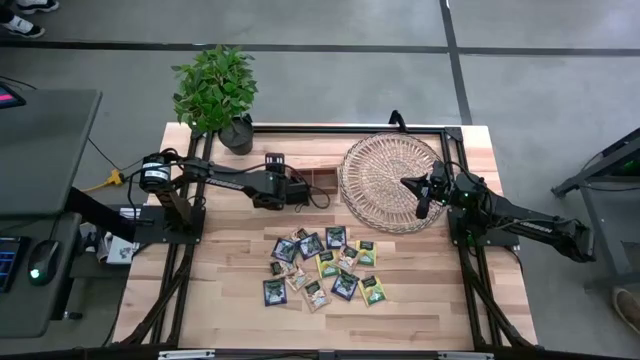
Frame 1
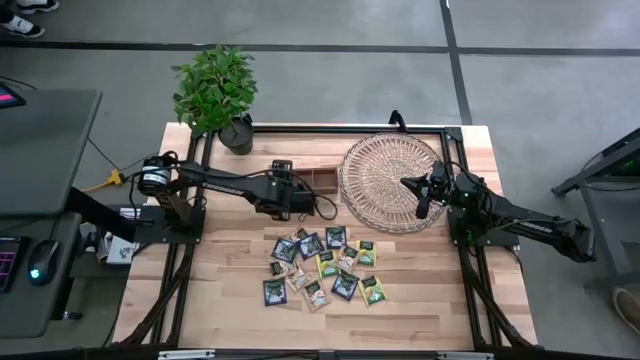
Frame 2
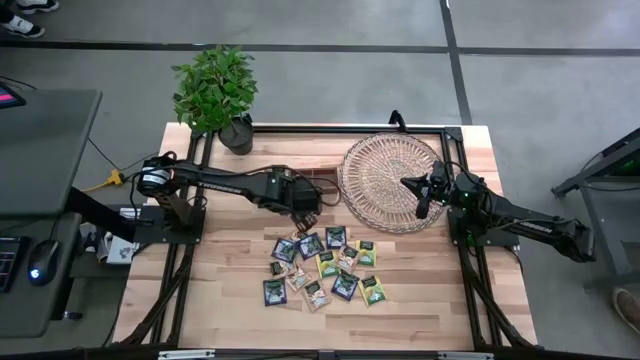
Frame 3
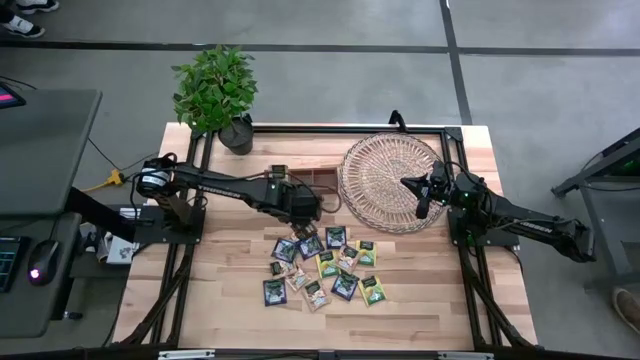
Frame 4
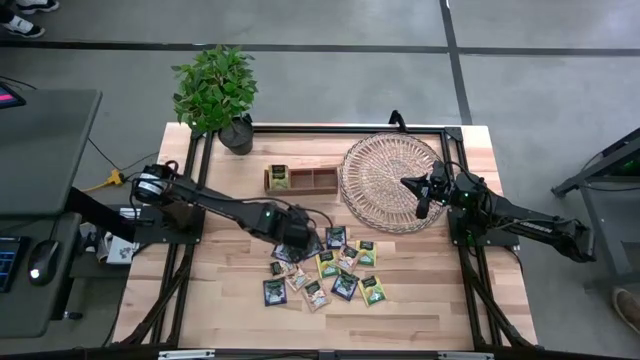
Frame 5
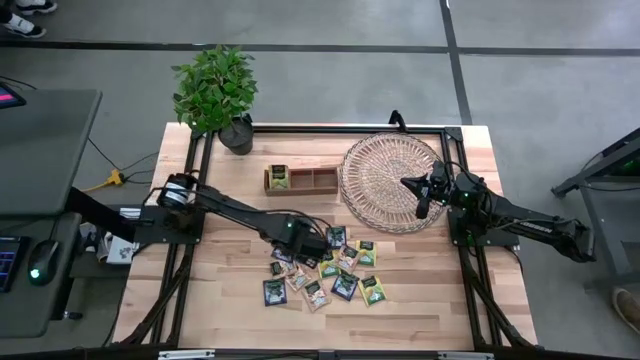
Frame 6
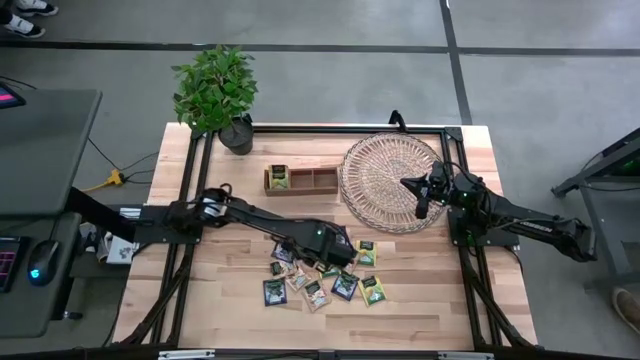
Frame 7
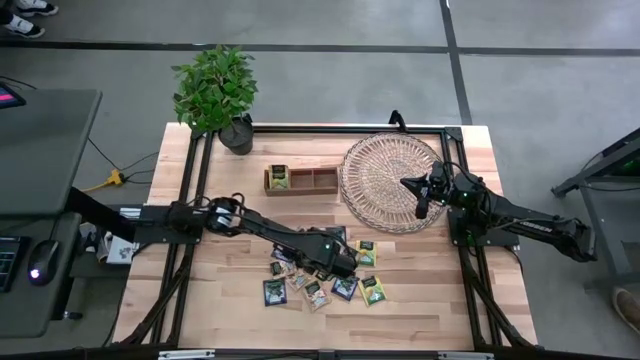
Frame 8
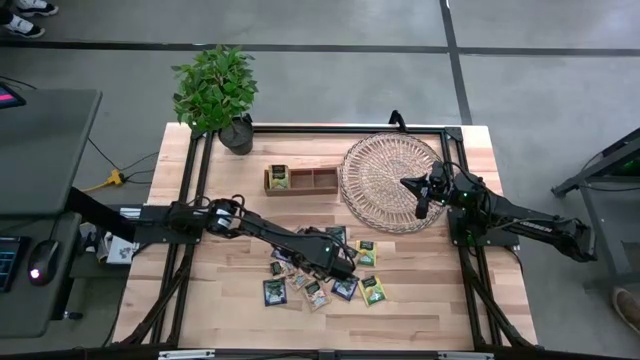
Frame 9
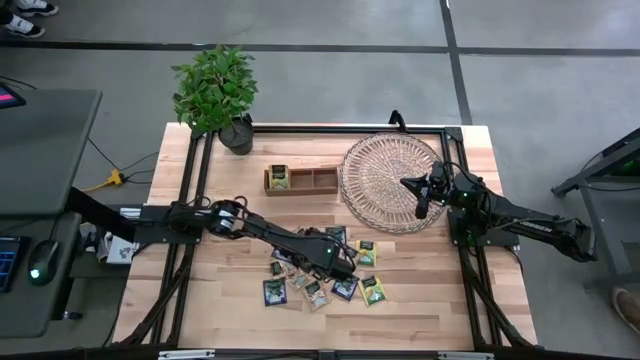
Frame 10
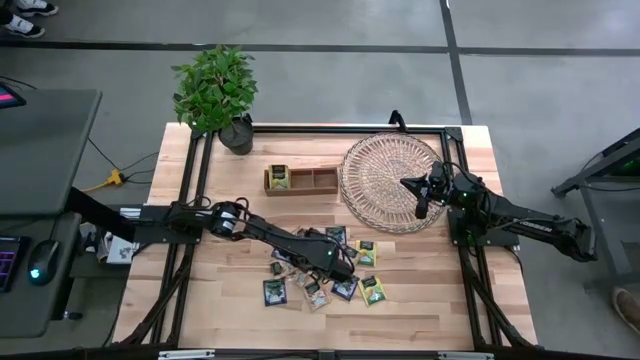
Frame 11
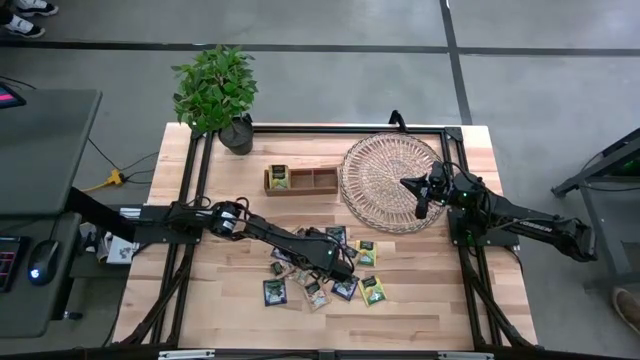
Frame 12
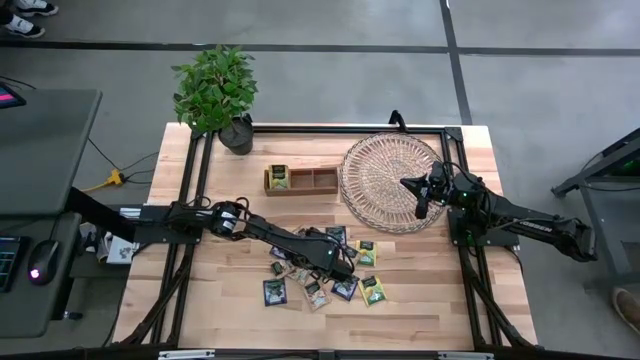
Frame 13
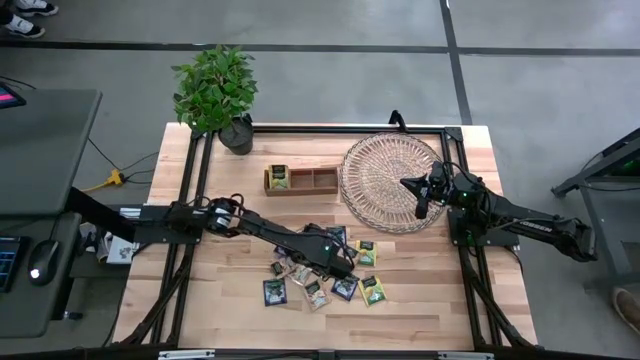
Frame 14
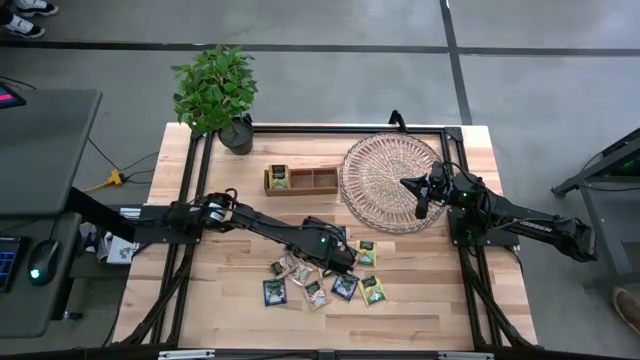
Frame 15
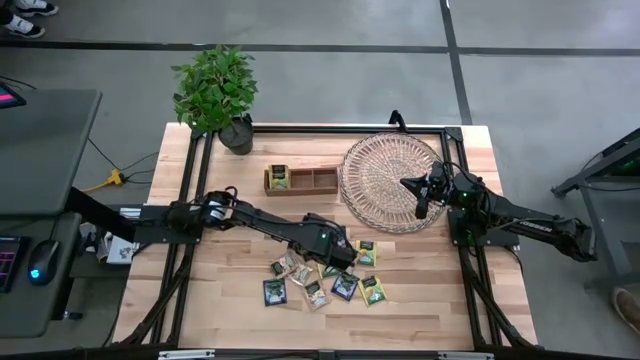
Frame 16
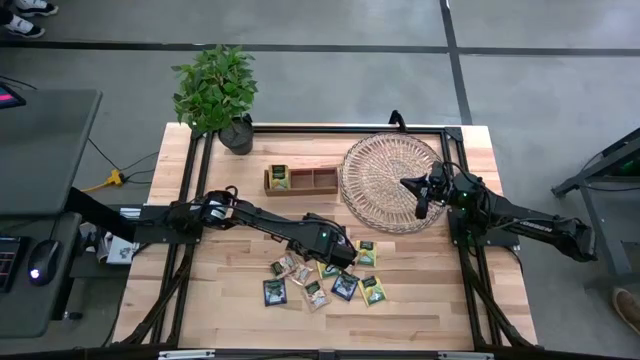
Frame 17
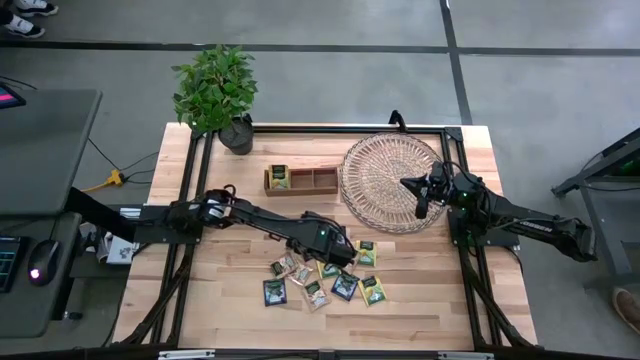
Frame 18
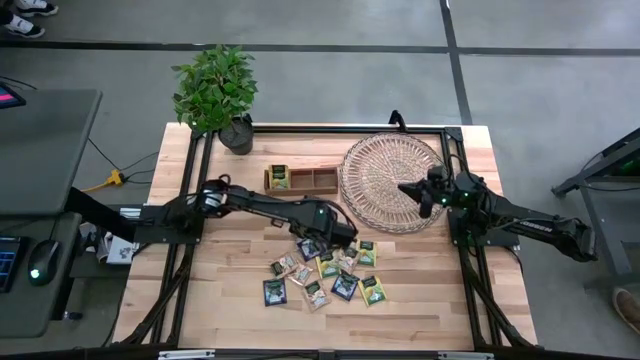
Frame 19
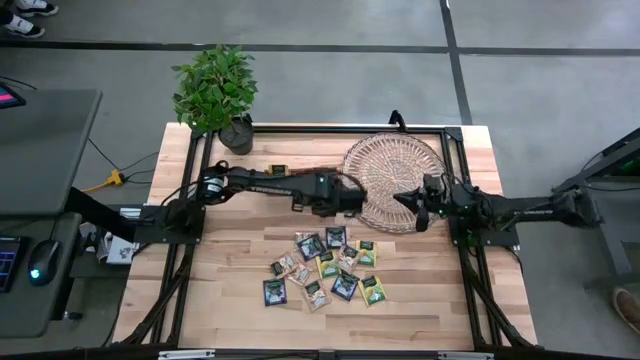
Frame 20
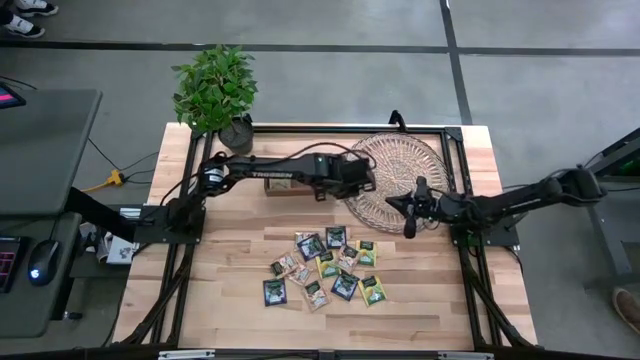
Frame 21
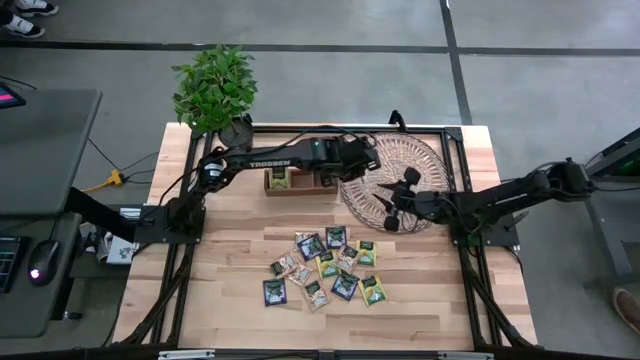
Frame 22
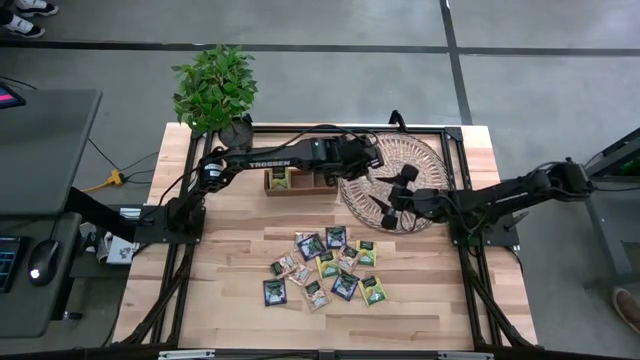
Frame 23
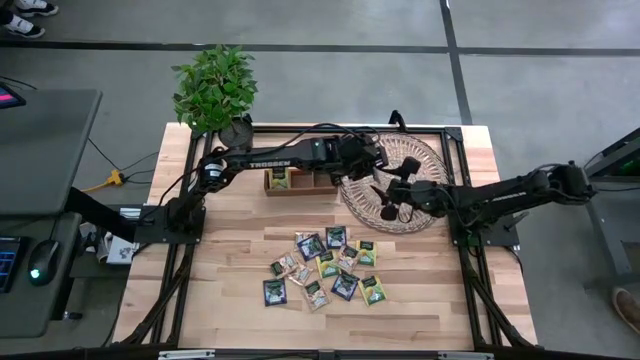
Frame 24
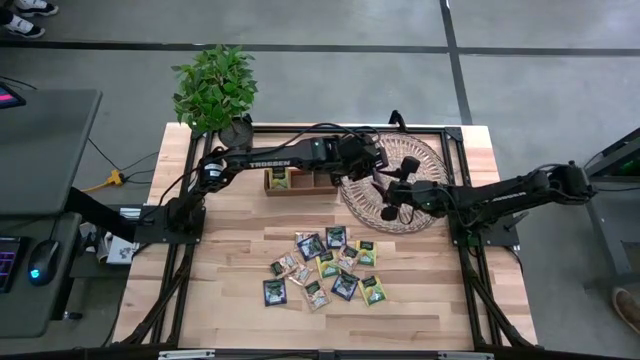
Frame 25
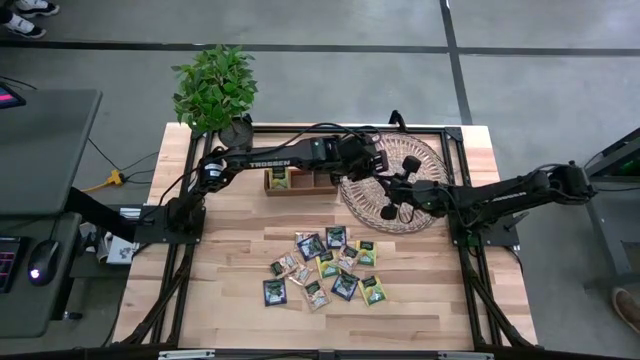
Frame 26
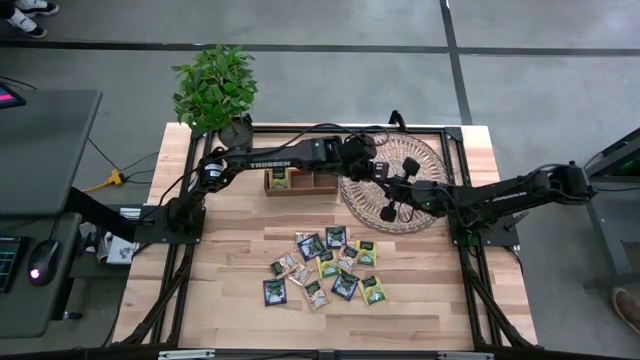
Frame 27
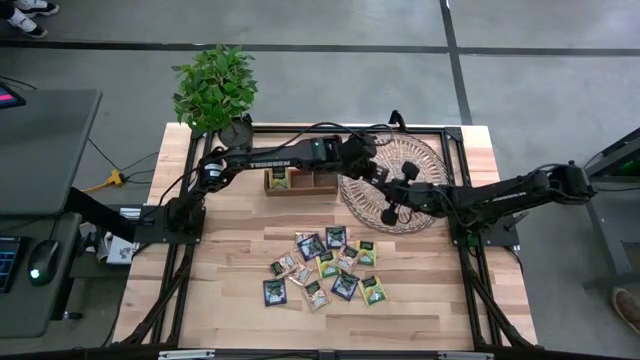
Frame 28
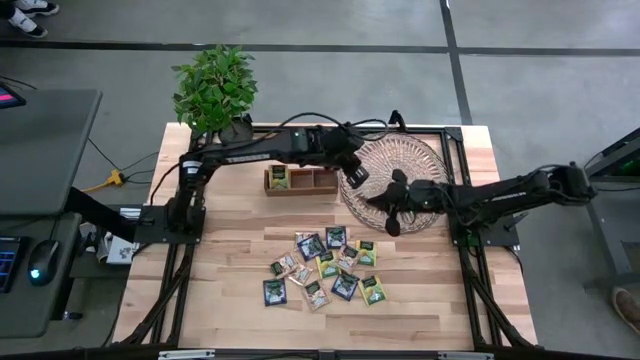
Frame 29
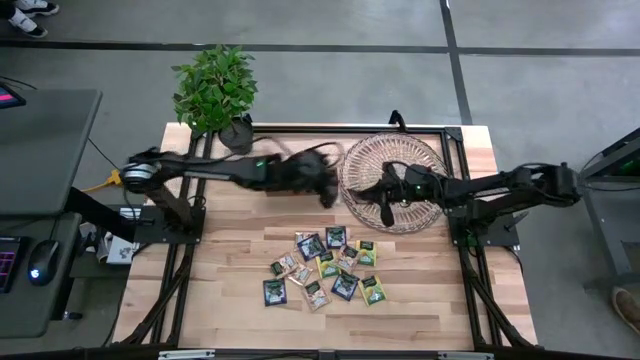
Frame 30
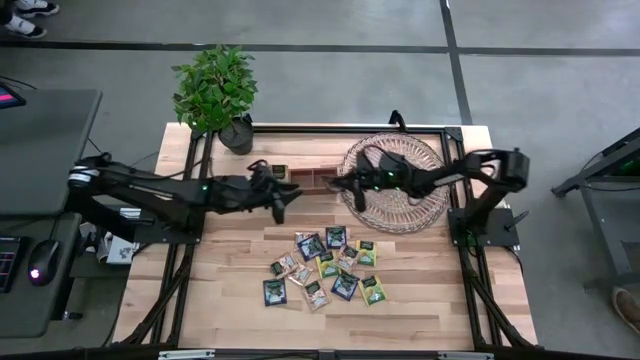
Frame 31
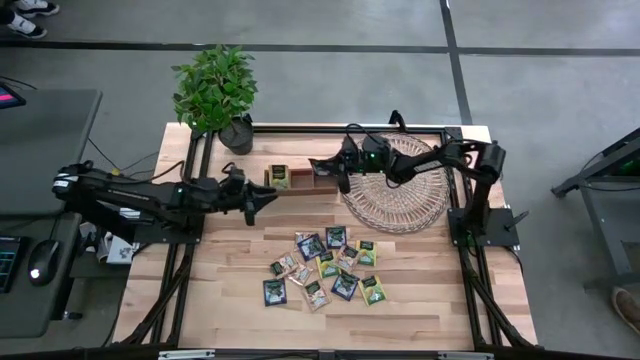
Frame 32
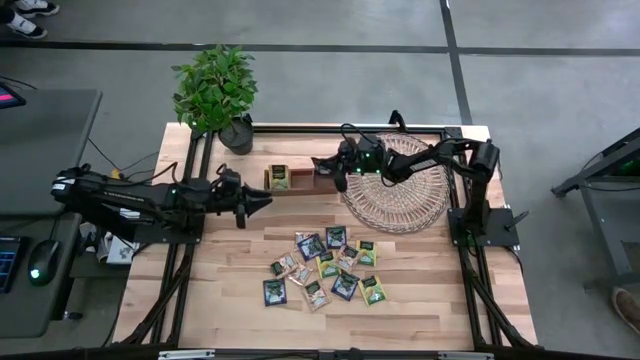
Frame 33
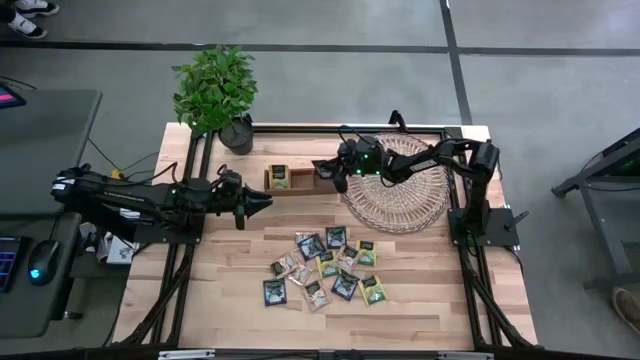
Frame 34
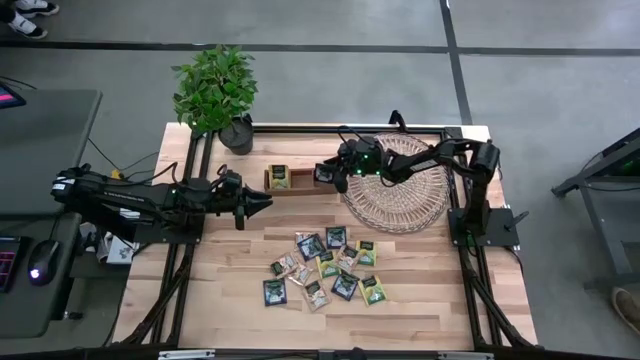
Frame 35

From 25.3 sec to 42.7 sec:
Task: Pick & Place Tea
Put the blue tea bag into the right section of the wooden organizer

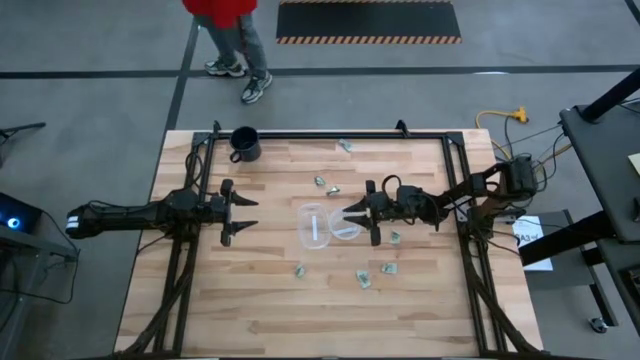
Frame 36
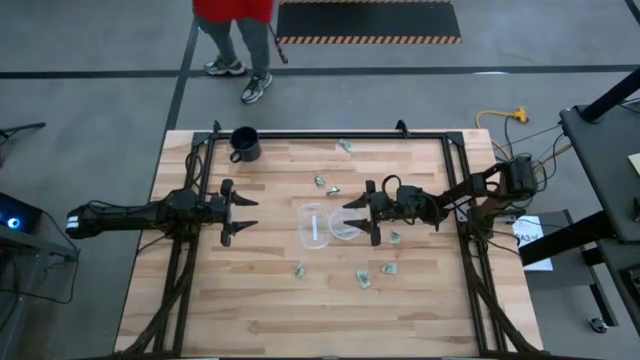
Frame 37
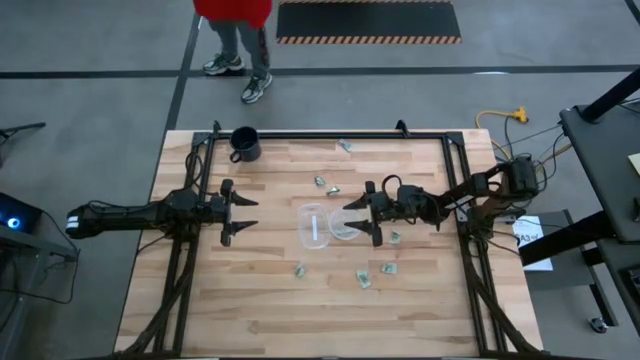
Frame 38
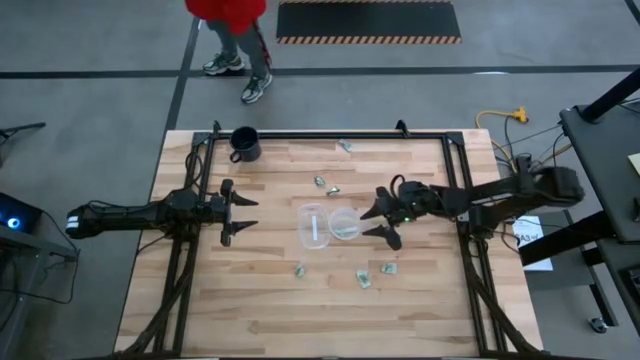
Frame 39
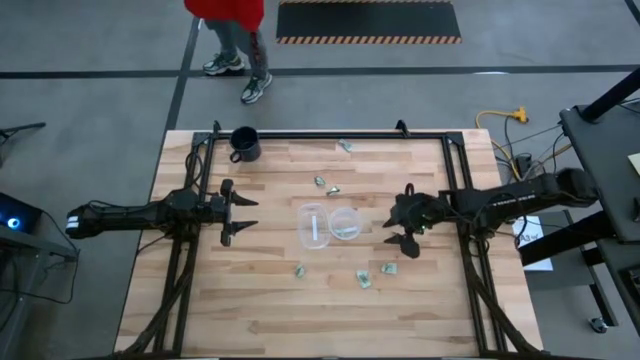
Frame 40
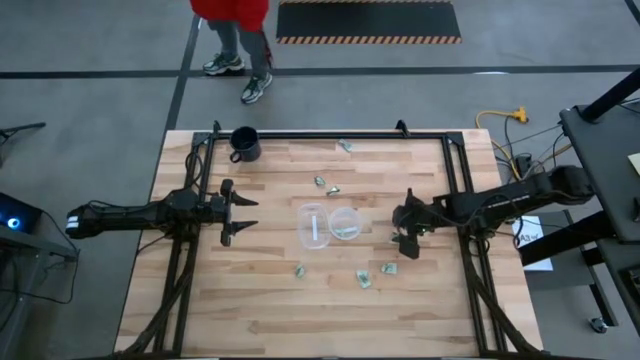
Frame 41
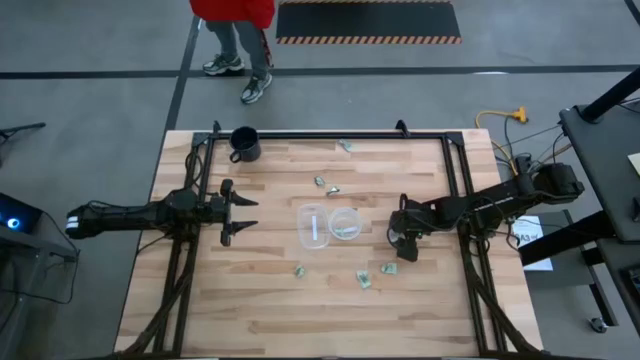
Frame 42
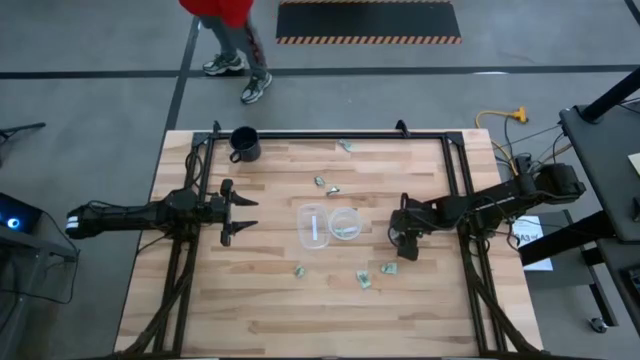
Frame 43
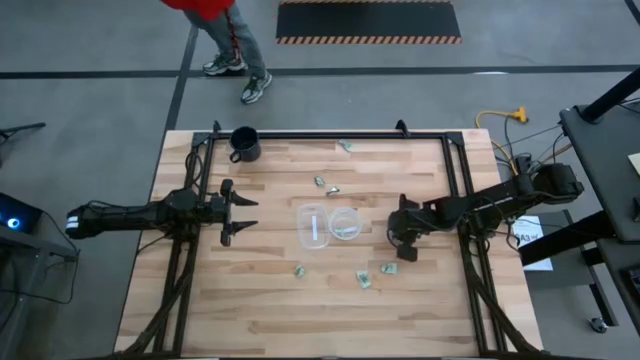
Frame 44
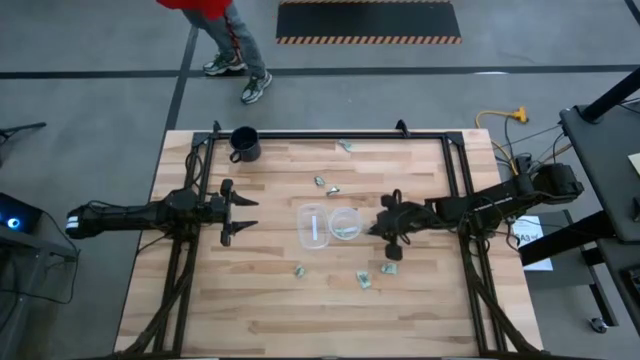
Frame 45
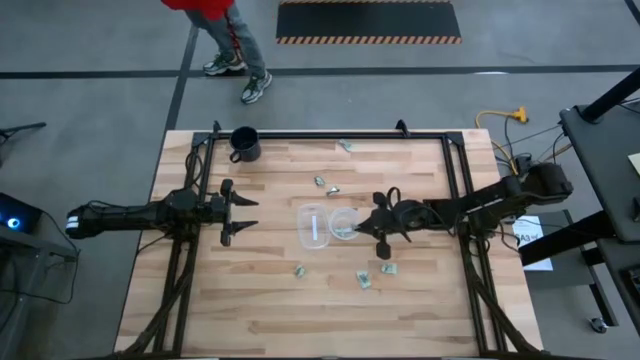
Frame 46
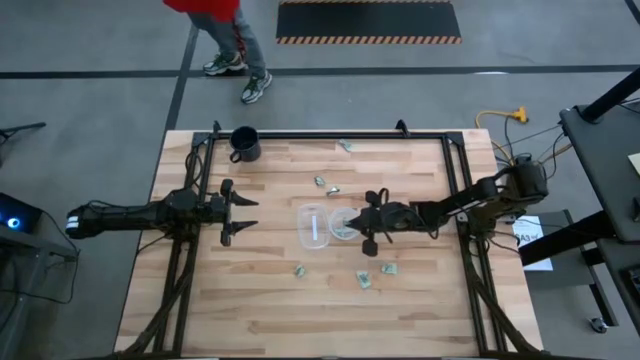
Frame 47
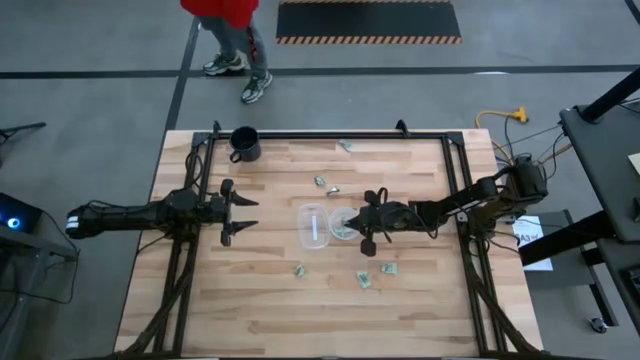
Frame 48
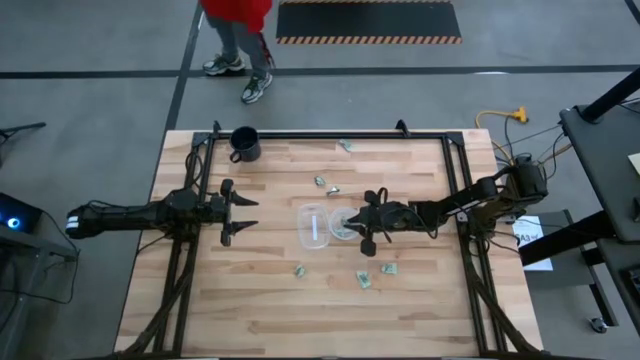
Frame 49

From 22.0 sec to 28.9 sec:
Task: Pick and place Stevia / Truvia into bins
Put the green stevia packet into the right transparent container
